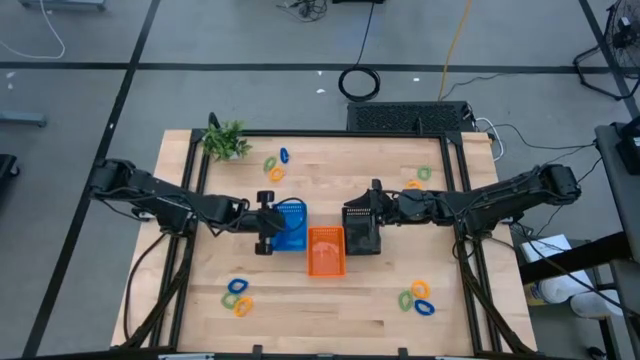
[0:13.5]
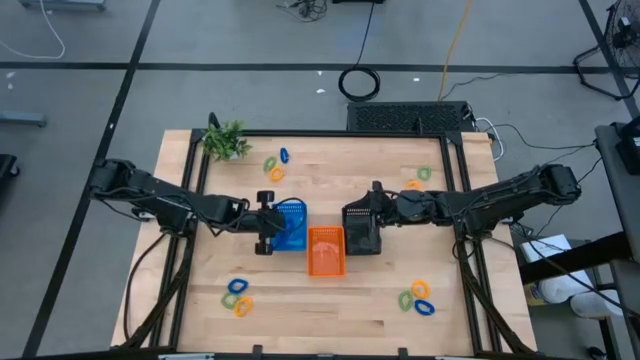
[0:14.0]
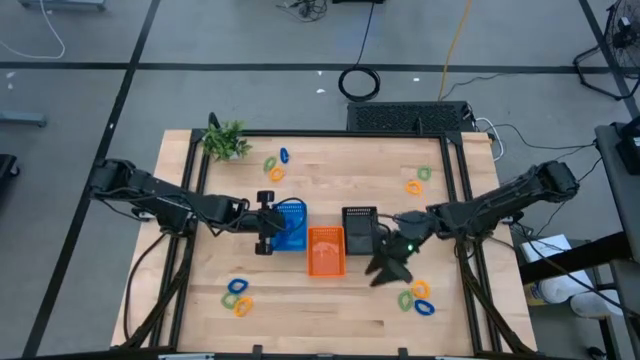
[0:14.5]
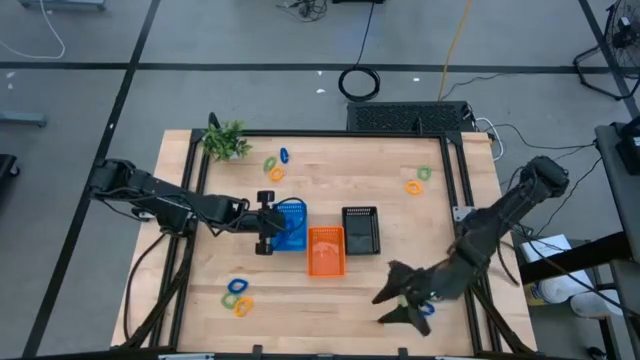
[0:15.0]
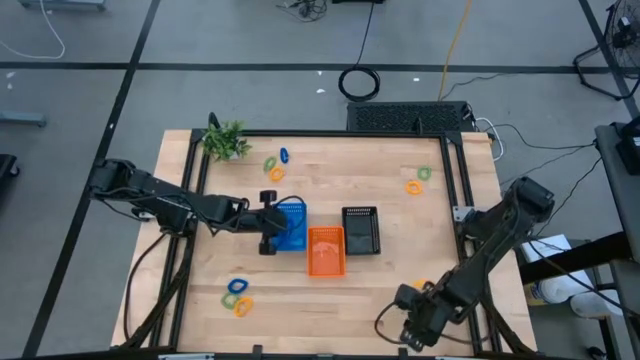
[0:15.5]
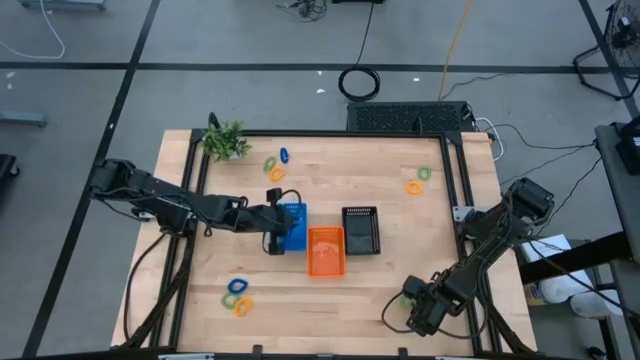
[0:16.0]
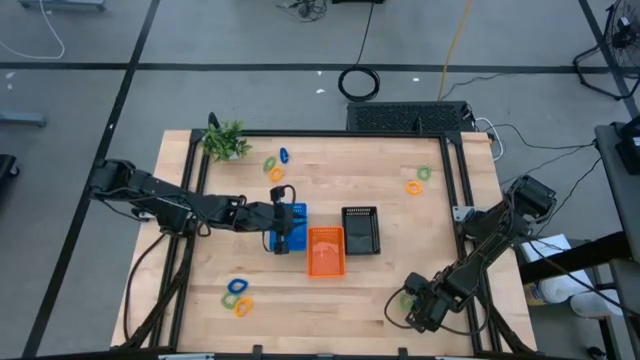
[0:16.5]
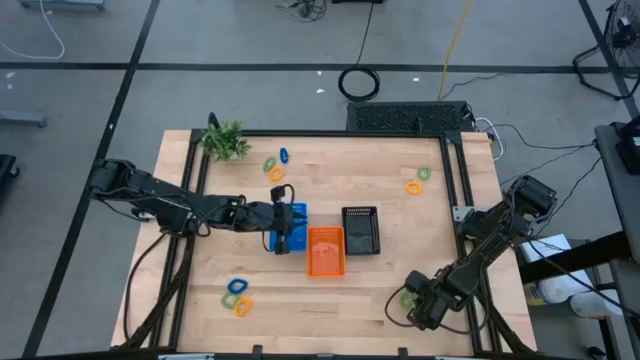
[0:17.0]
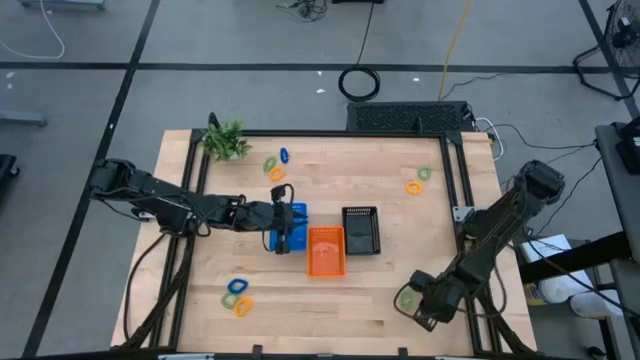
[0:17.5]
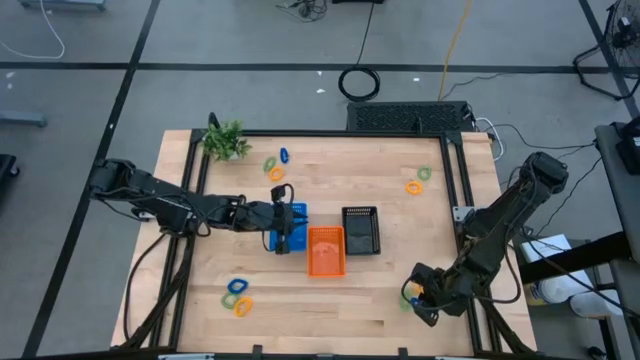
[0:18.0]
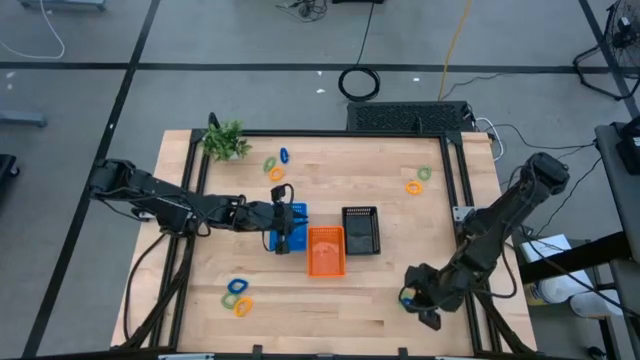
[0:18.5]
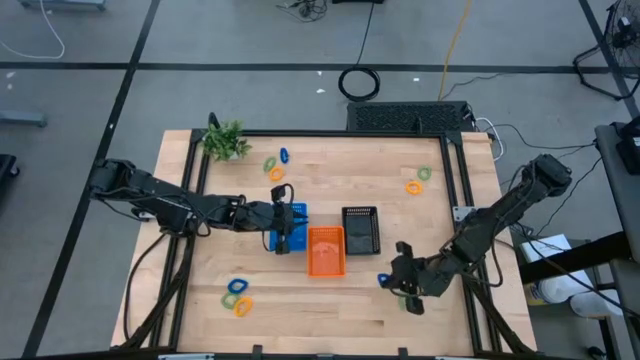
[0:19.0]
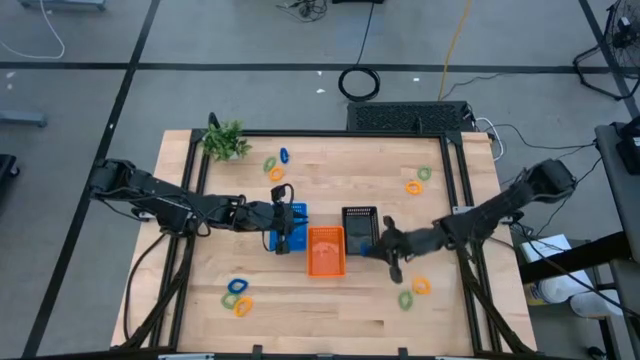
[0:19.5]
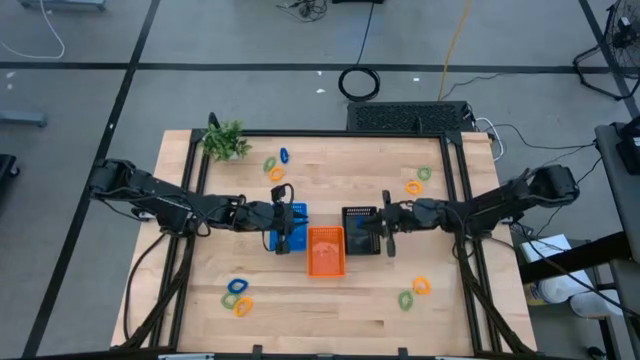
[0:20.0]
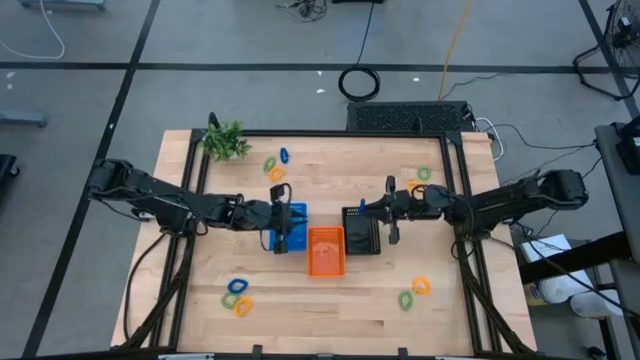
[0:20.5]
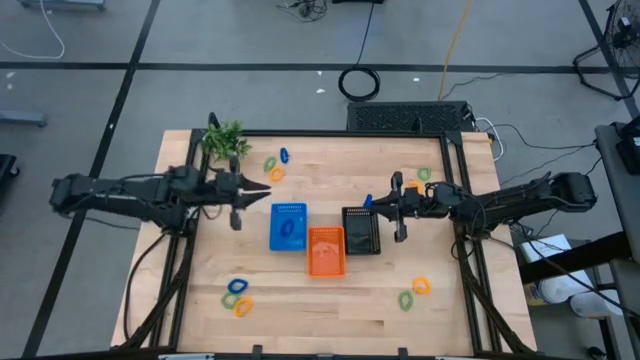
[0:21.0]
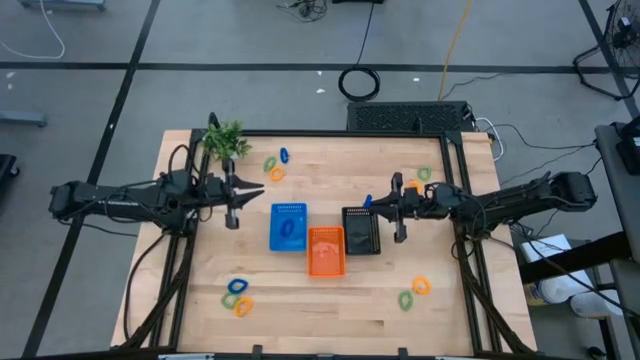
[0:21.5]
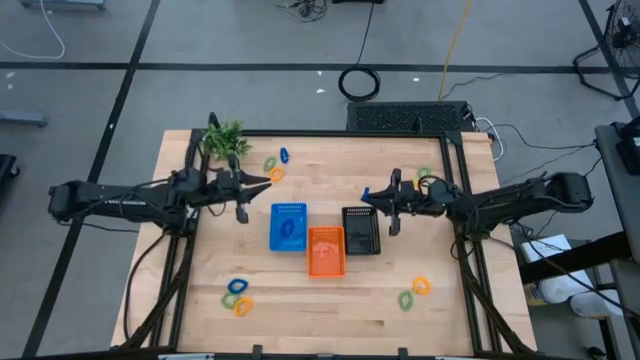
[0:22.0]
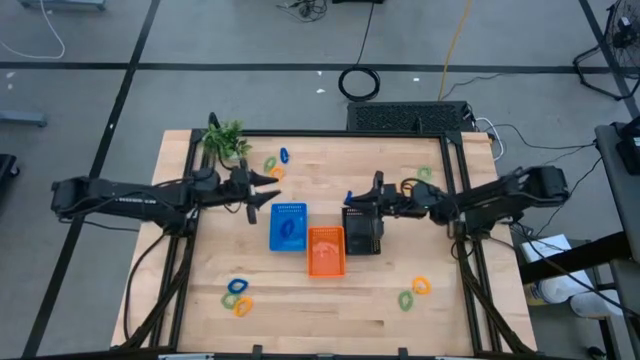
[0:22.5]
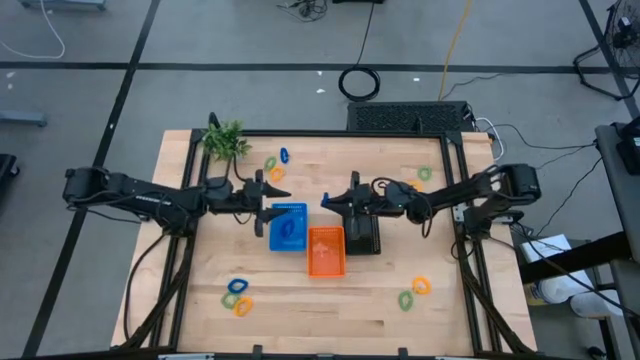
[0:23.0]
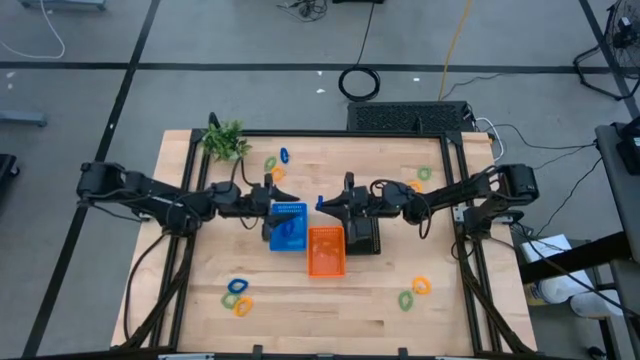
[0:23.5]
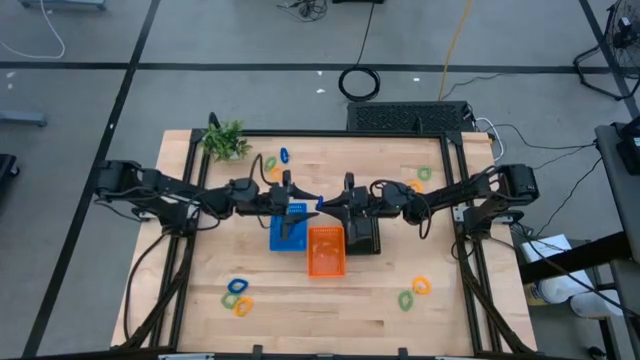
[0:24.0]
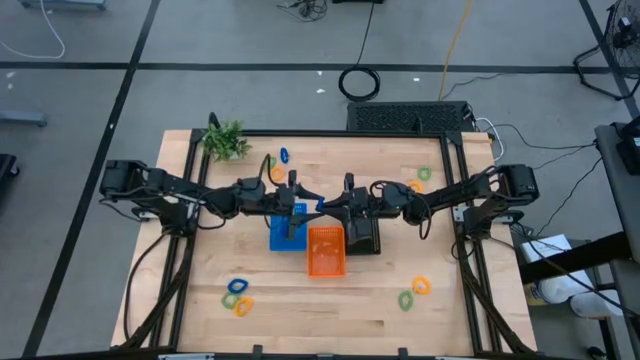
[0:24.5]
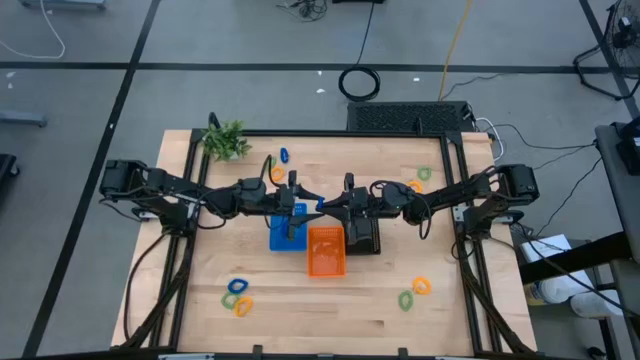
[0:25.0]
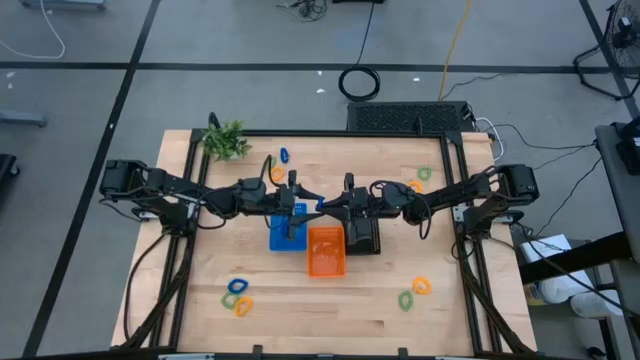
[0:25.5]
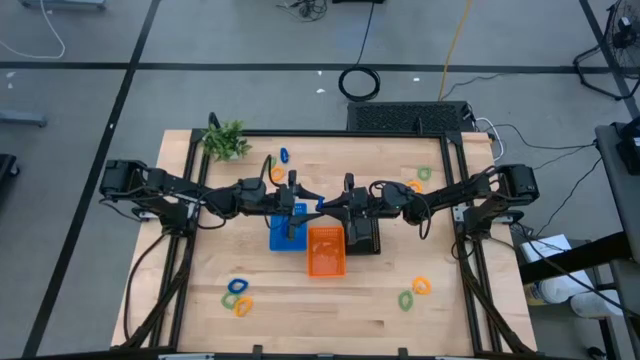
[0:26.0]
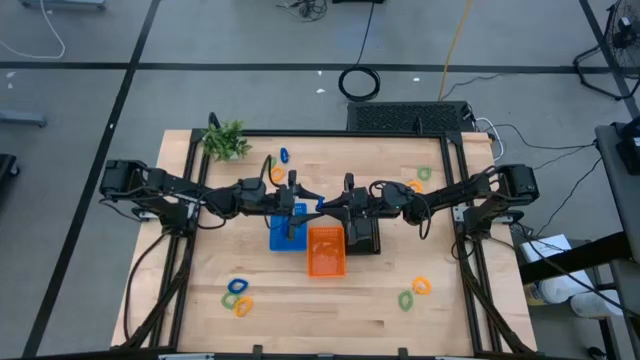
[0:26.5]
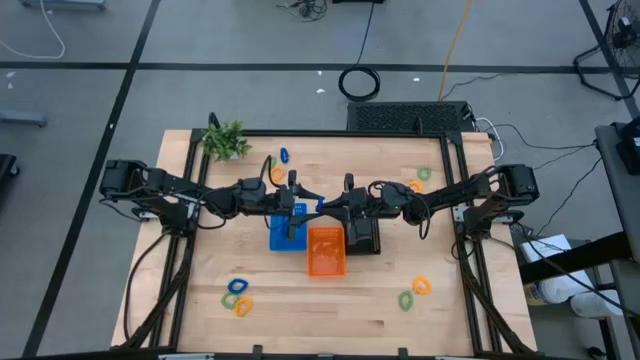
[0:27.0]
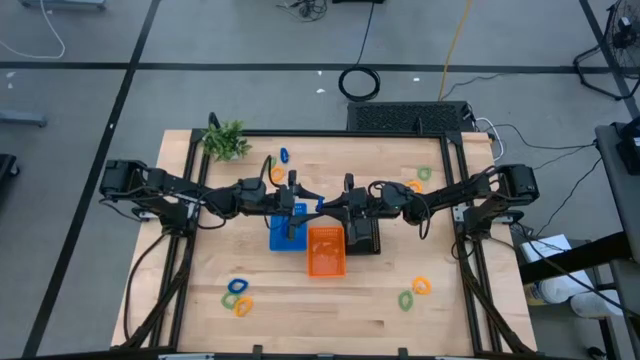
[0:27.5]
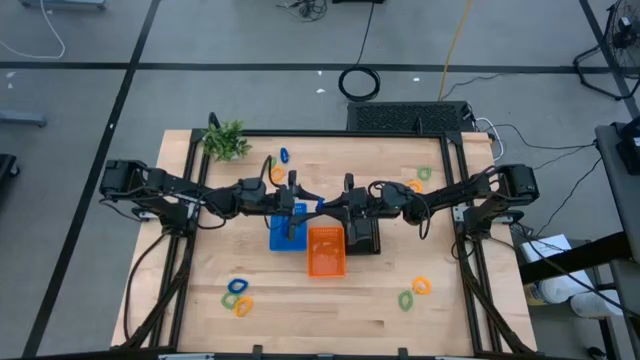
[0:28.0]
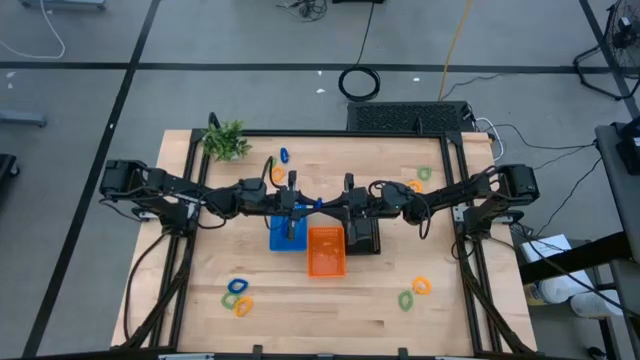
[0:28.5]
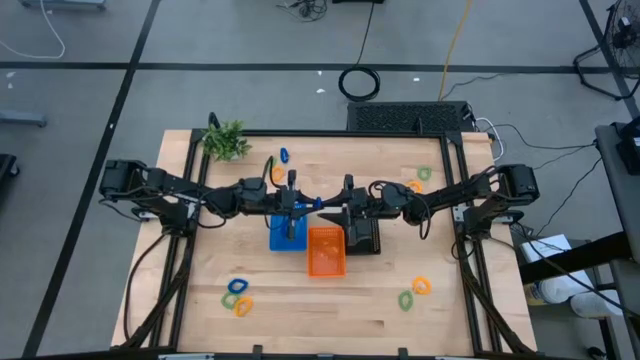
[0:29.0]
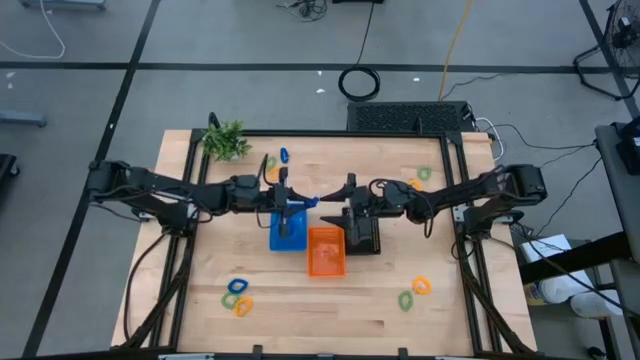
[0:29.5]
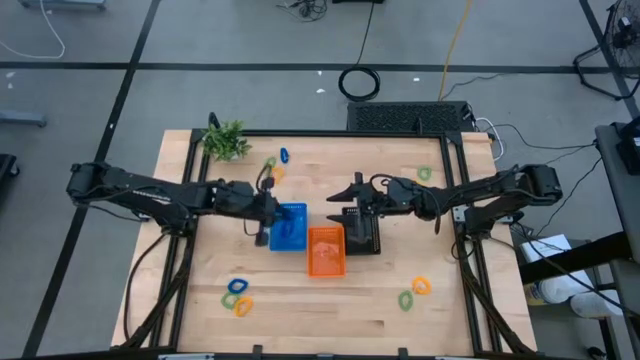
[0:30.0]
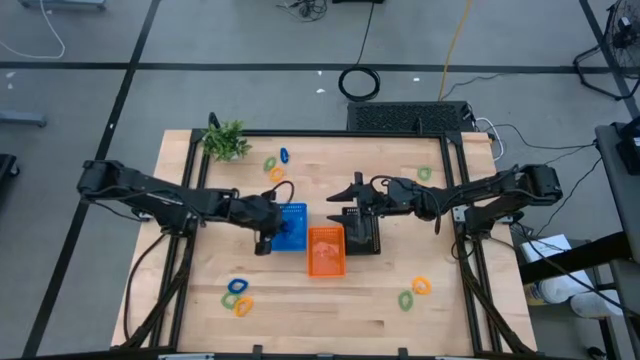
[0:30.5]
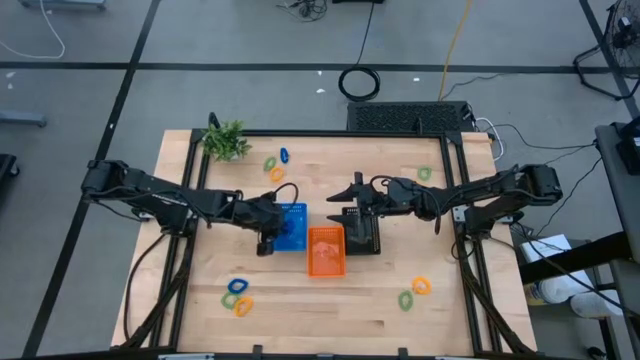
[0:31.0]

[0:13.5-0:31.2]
Task: Sort spring keychains
Put the blue spring keychain into the blue bin
